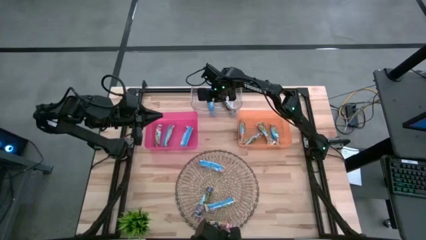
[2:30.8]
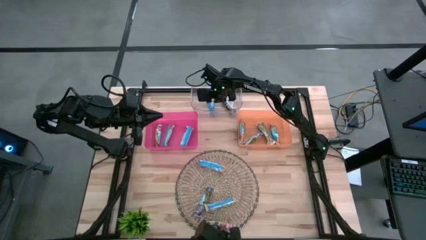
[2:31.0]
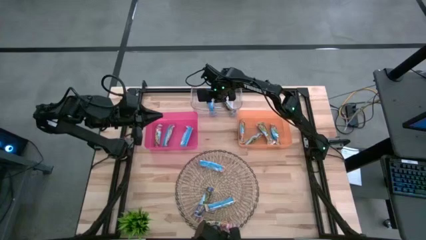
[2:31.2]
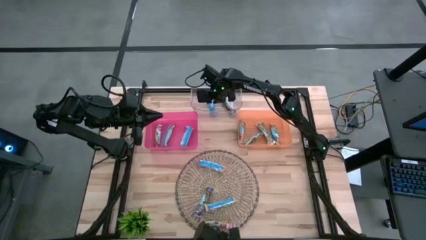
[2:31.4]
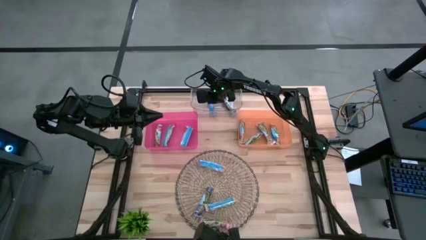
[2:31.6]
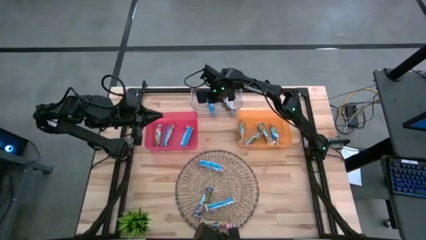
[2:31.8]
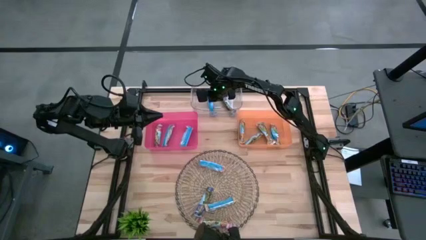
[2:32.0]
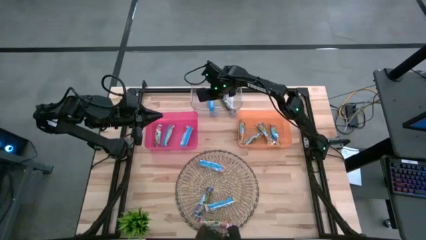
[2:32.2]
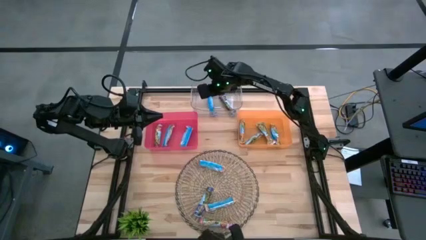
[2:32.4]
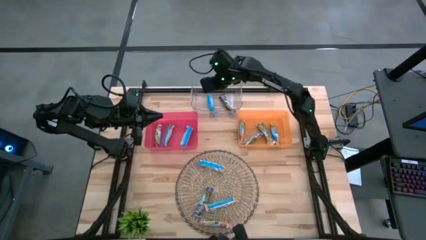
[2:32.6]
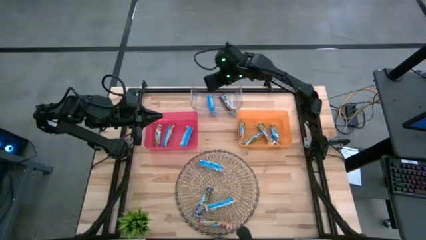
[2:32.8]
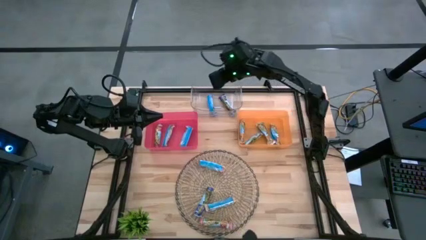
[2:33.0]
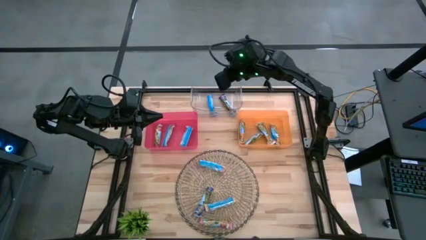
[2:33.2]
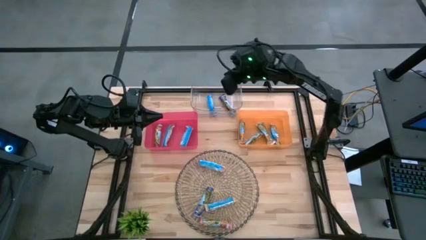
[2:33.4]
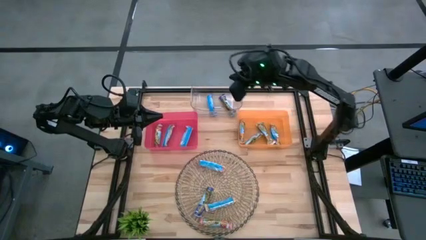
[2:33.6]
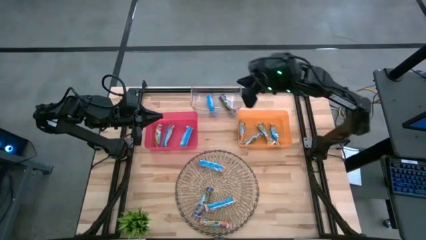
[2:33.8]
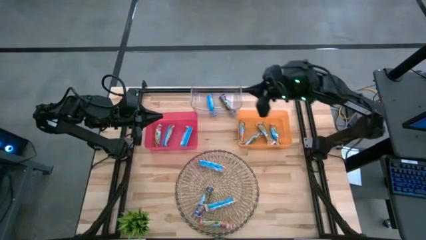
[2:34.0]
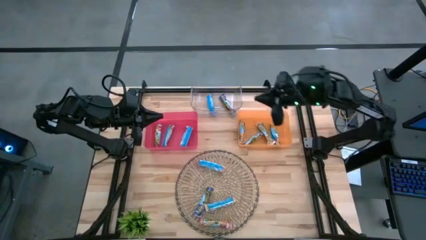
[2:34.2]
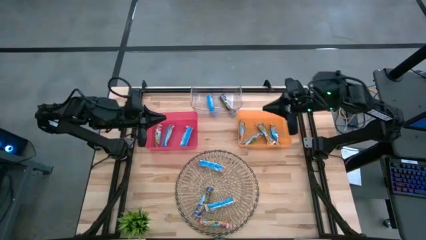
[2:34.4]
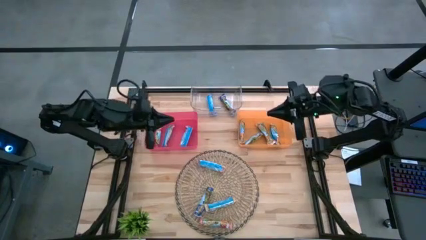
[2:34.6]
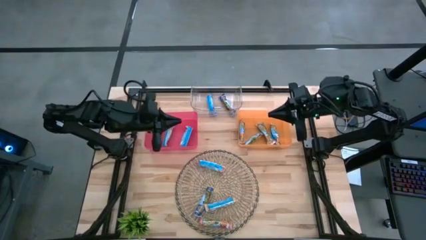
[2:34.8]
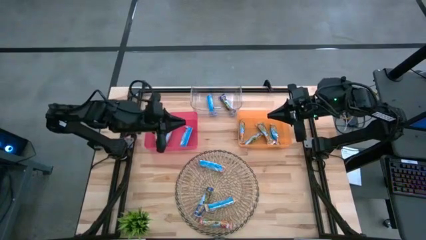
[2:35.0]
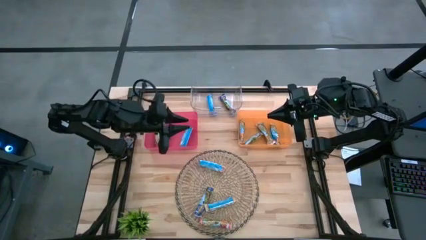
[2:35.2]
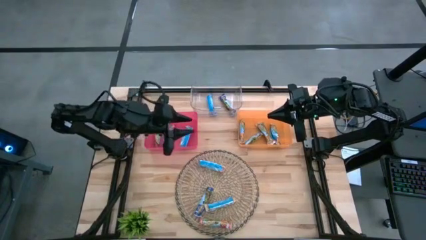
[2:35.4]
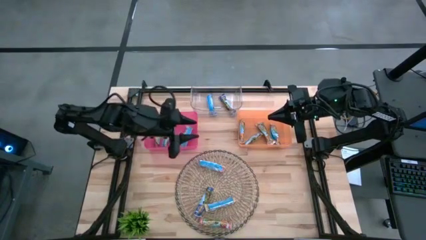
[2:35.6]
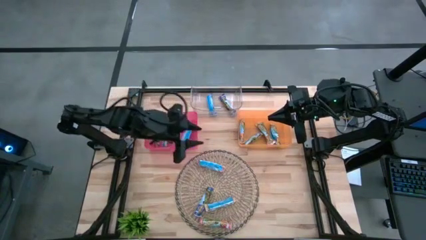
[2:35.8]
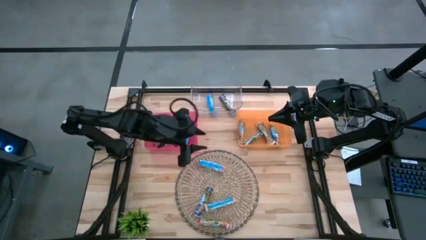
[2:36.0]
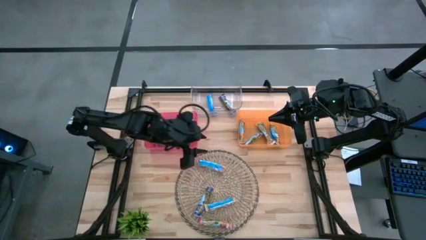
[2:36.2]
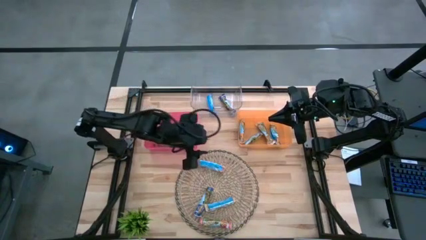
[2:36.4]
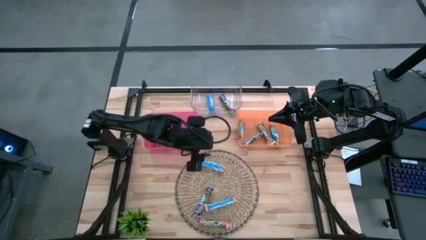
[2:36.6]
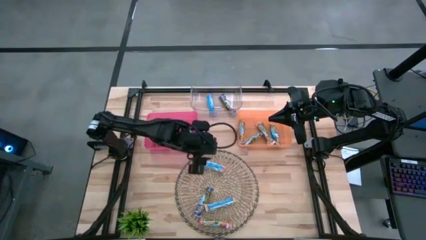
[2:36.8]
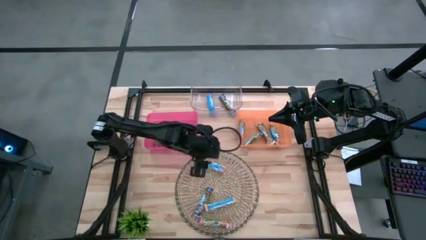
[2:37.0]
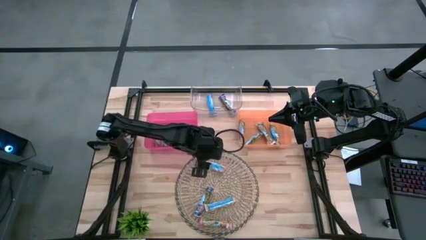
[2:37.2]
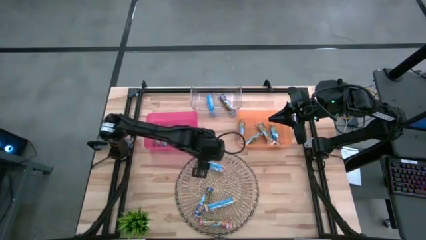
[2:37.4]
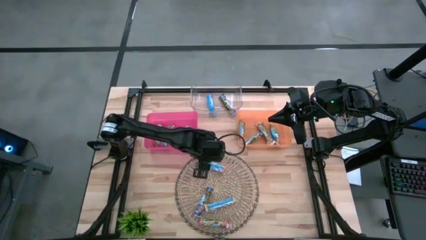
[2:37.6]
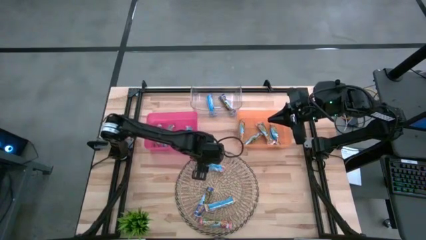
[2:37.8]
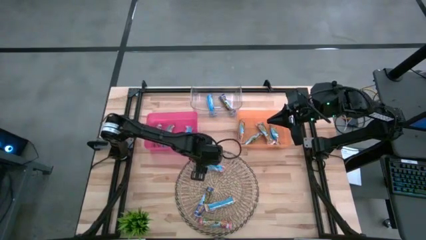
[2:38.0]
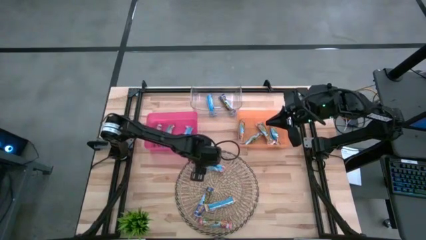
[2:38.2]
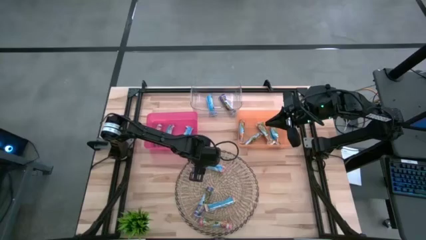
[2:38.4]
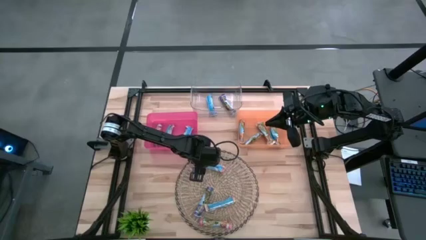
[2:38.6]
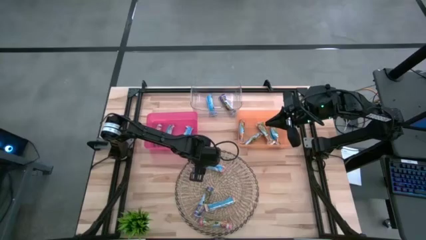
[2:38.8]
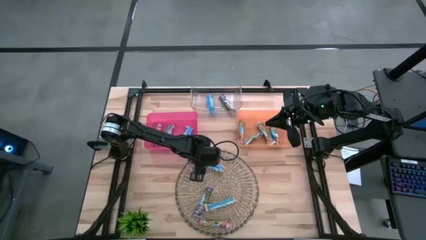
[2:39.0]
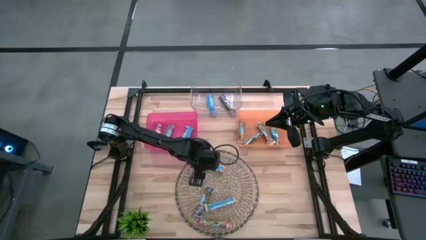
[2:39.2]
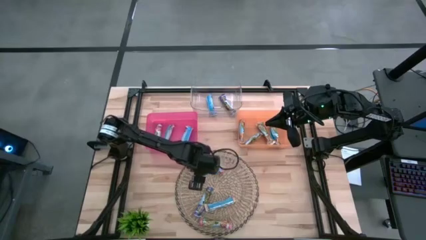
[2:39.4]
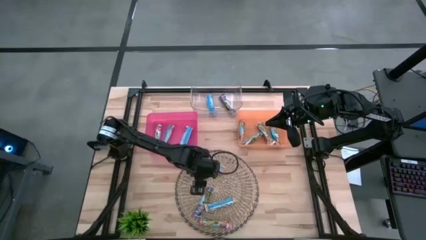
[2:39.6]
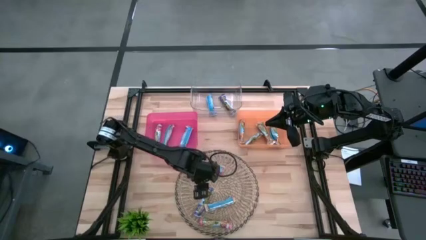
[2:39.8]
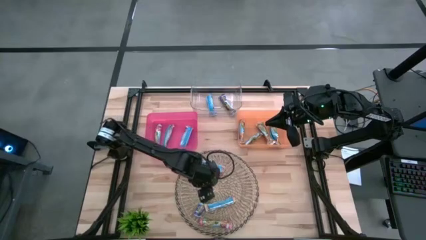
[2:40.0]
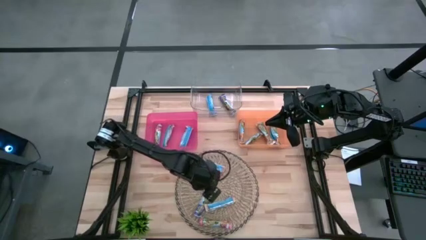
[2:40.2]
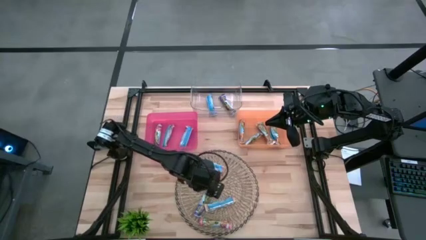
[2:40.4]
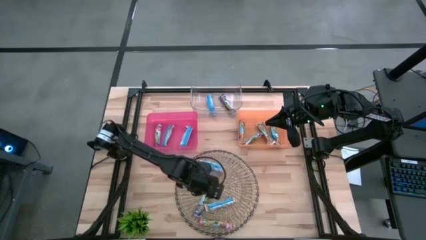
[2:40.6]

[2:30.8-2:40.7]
Task: Pick and place Granola Bars by type
Put the blue granola bar into the transparent bin

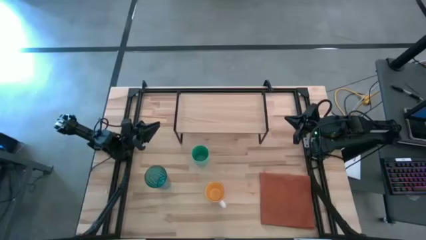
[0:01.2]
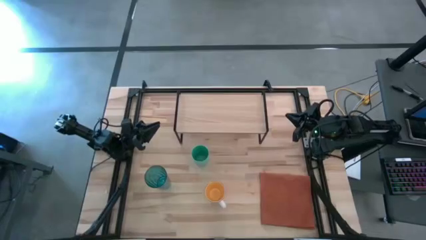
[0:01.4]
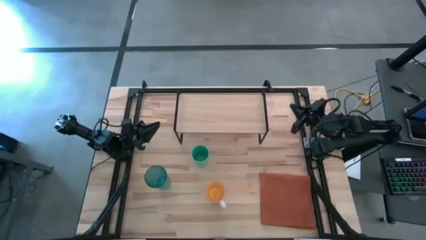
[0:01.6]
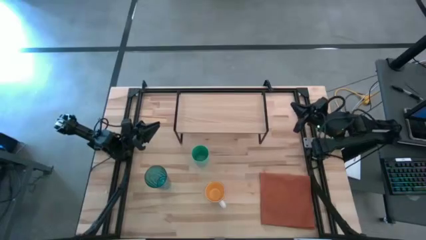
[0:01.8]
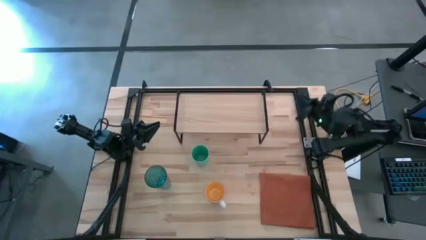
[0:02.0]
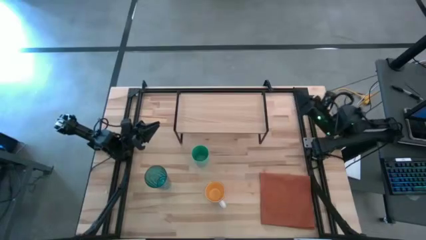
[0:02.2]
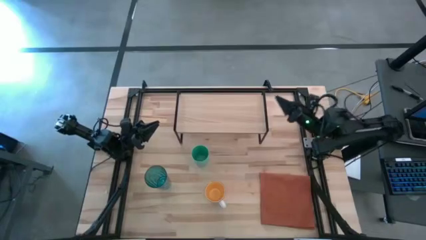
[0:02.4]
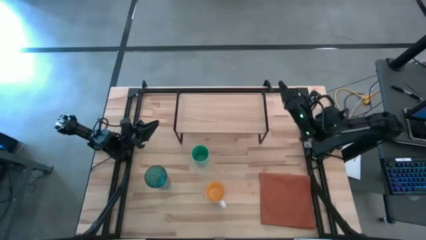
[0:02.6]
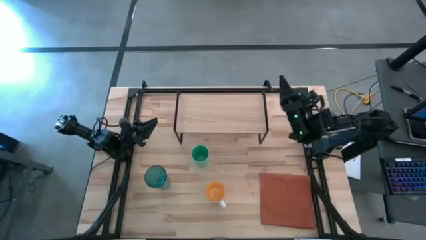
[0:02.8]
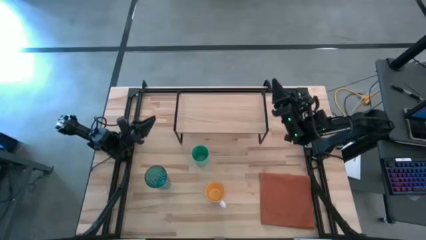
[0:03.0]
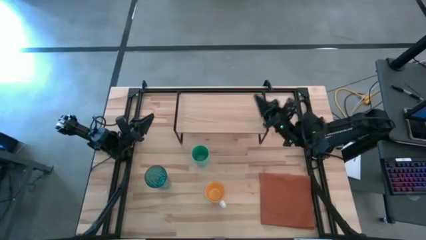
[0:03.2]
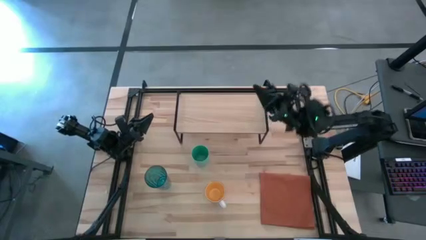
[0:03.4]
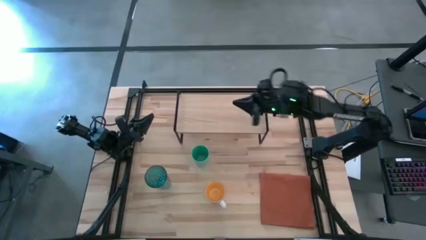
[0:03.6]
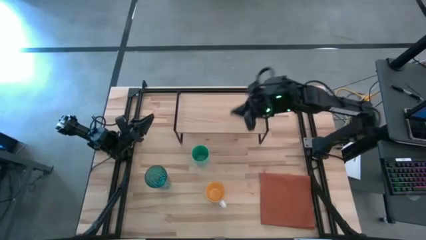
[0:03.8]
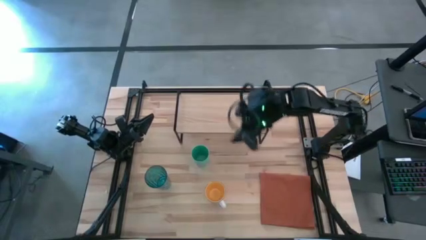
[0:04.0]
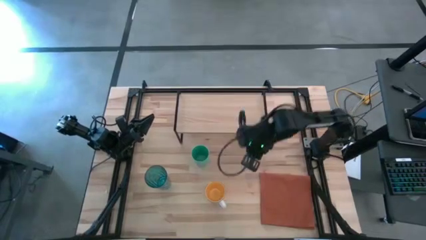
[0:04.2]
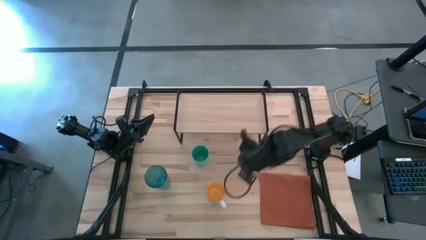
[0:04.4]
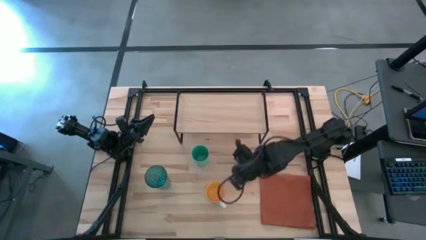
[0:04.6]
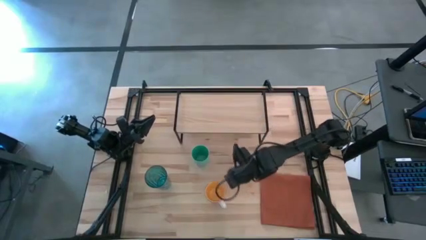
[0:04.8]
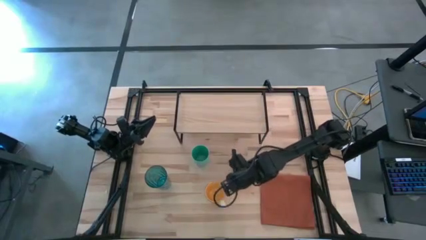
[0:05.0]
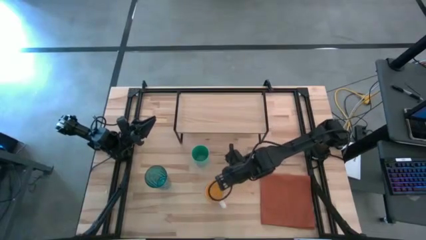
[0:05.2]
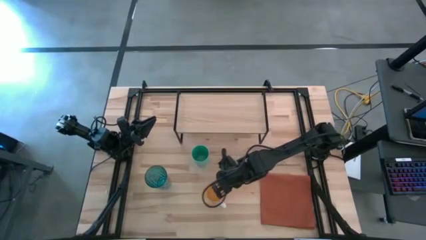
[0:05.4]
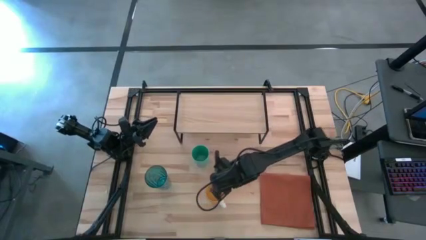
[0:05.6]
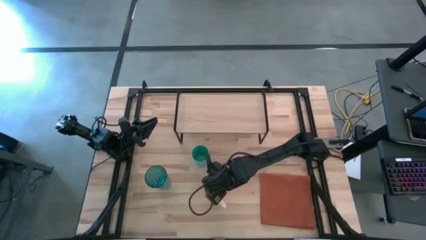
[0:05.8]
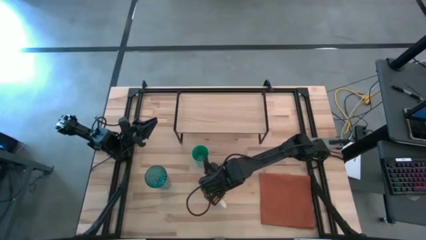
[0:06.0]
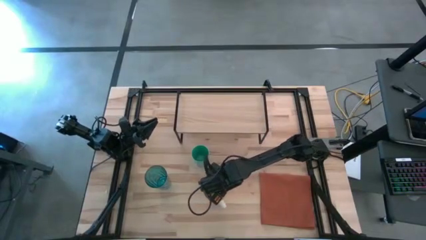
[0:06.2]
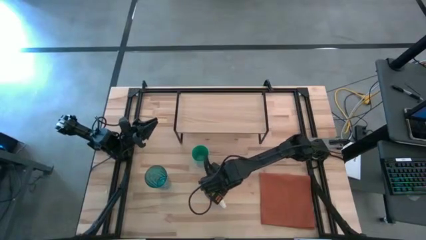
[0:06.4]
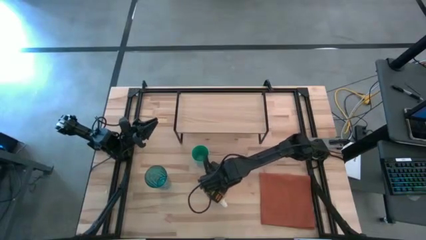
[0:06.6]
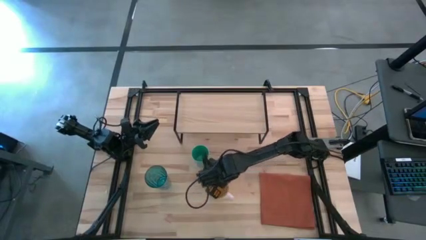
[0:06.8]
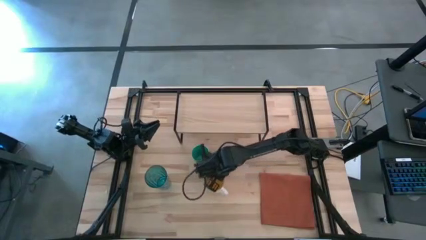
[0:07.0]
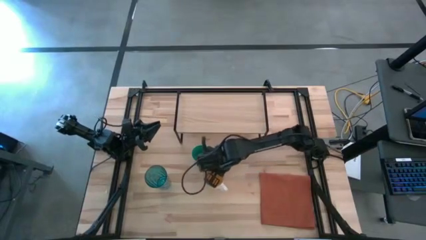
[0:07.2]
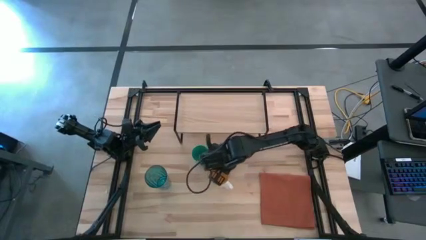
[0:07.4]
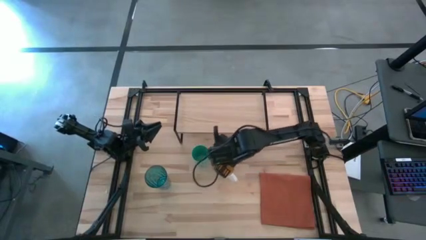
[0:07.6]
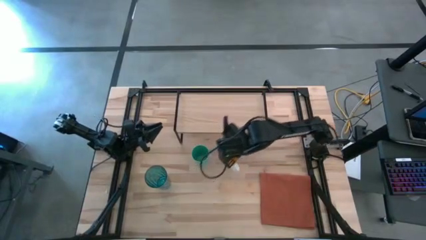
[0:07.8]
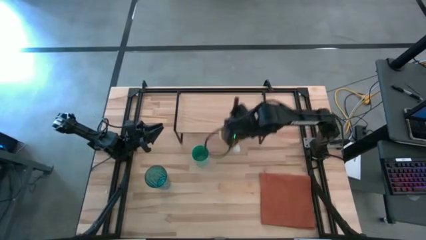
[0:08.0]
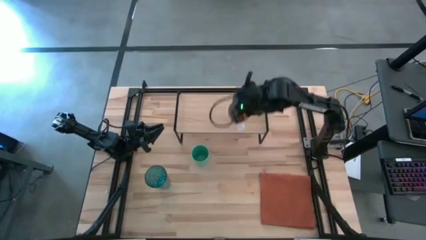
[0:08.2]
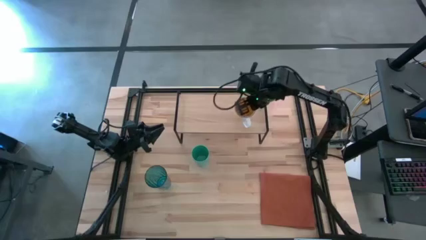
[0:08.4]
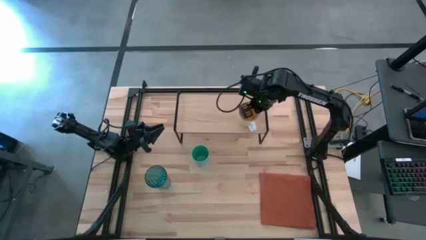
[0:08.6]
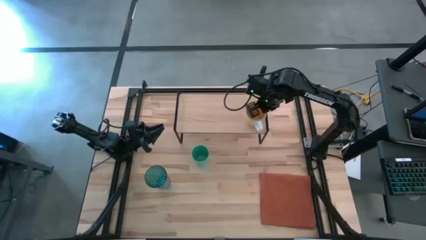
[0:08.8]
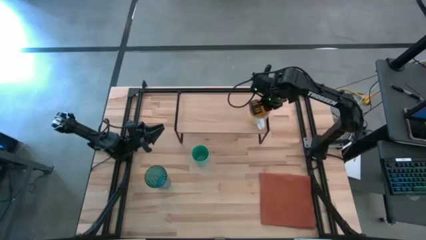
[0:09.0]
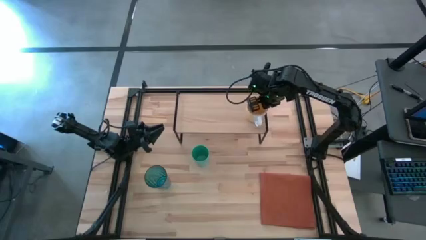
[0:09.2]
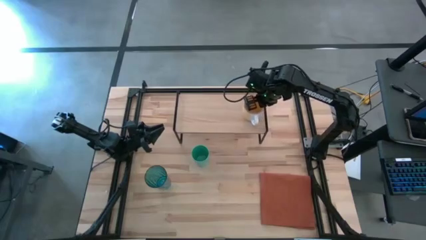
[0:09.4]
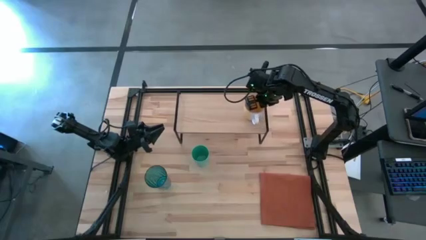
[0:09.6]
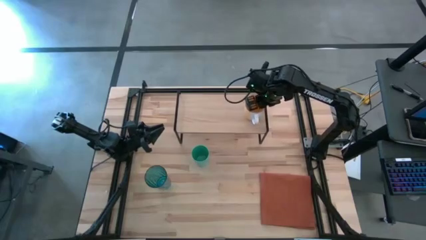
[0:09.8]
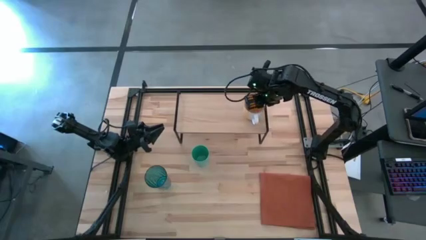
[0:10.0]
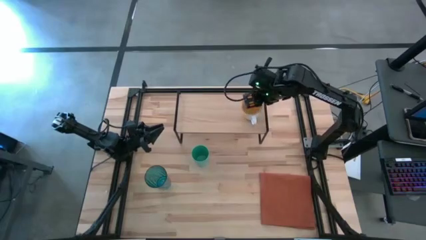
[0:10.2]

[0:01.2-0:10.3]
Task: Stack small to large cups/mugs on shelf
Put the yellow mug on the shelf
